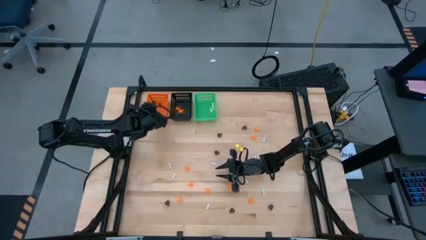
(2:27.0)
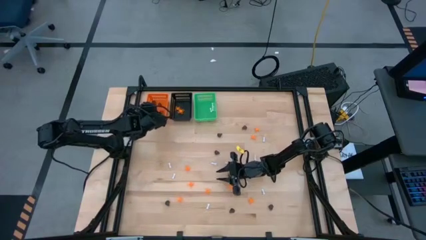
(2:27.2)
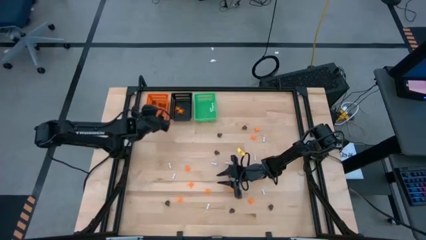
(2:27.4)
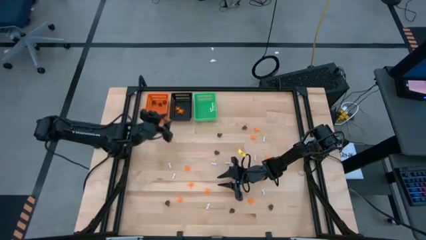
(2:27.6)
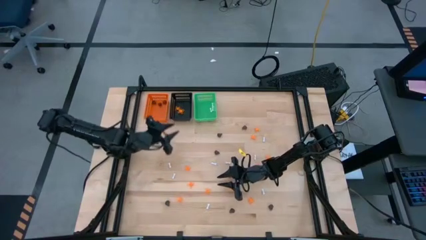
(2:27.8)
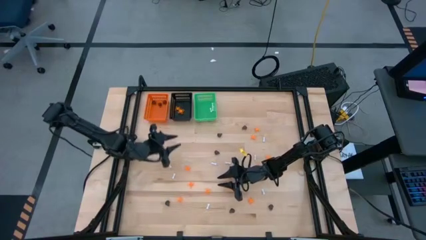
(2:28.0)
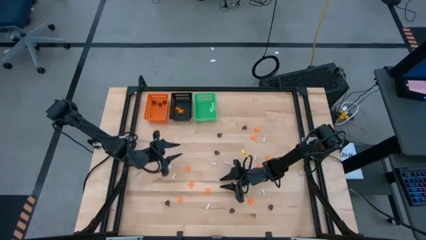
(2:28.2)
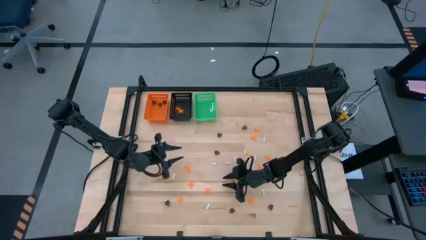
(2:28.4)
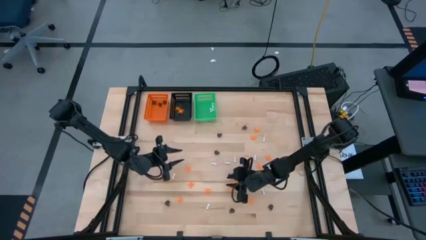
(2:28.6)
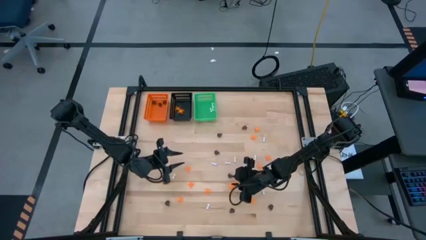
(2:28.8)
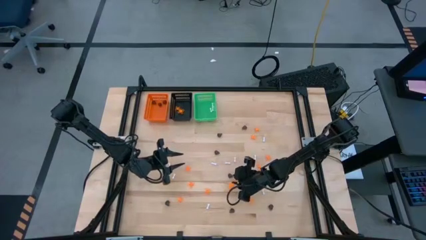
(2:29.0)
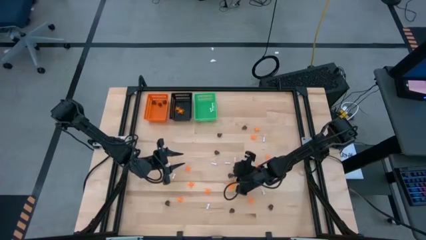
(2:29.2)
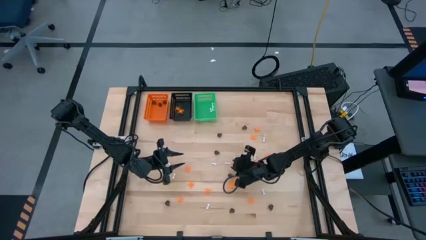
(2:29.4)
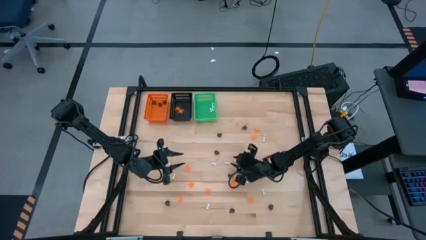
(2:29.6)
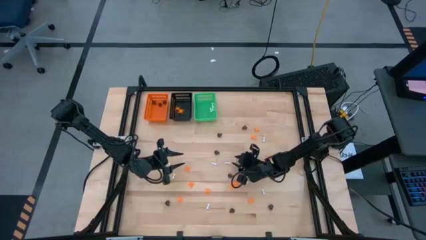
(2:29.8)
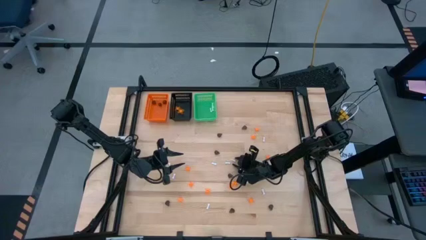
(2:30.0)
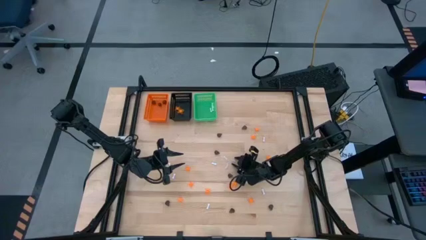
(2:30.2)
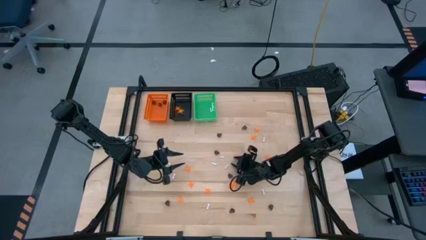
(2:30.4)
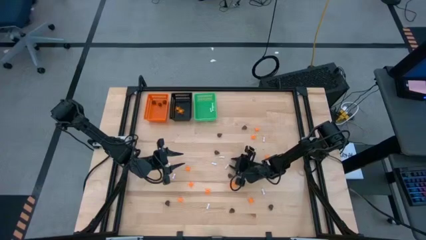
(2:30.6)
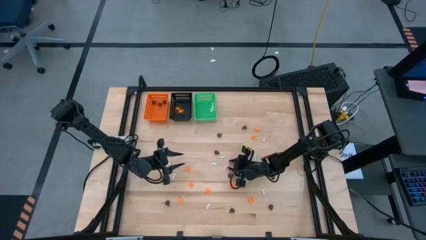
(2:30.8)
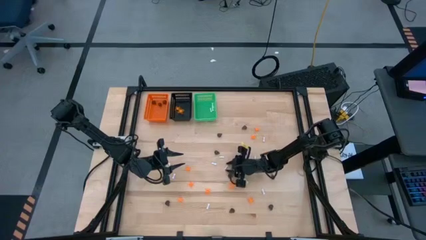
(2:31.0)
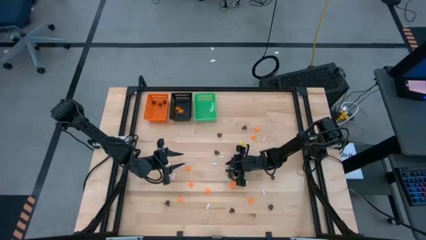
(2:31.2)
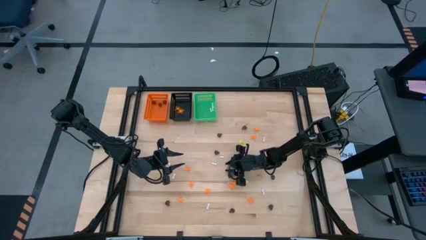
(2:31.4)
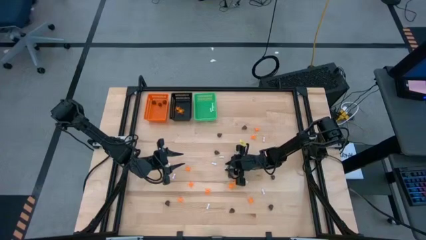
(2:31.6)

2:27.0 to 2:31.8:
Task: Sort Halloween decoration
Put the white bone toy into the green bin

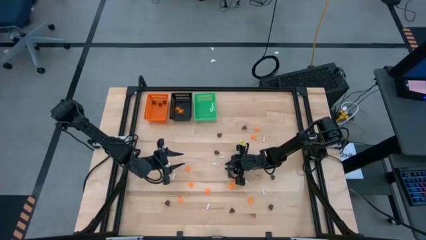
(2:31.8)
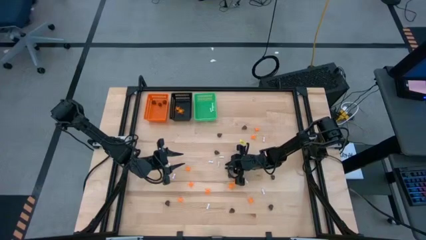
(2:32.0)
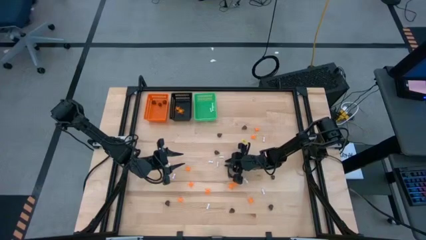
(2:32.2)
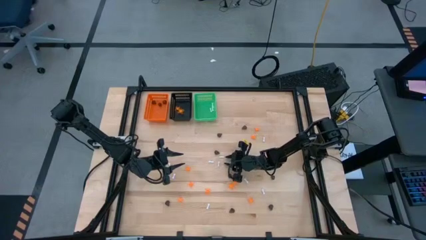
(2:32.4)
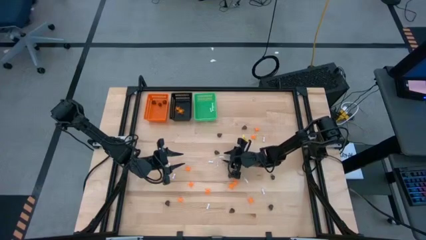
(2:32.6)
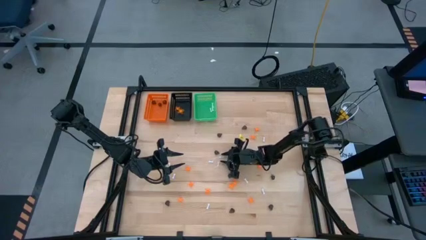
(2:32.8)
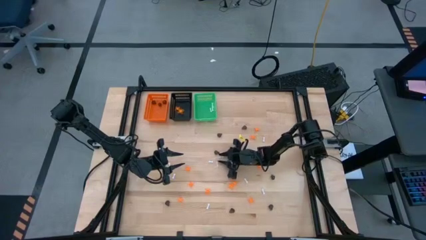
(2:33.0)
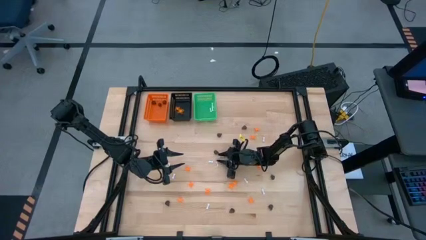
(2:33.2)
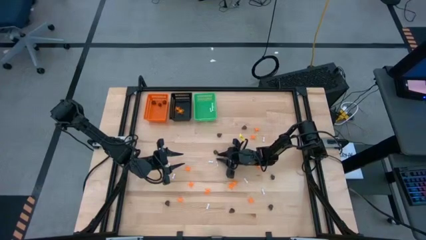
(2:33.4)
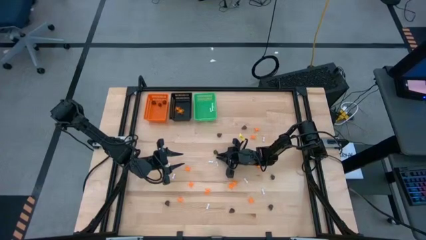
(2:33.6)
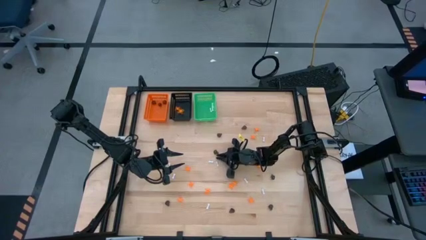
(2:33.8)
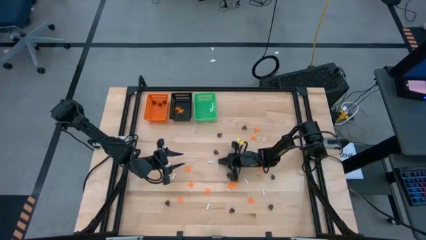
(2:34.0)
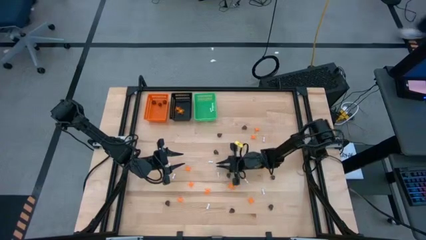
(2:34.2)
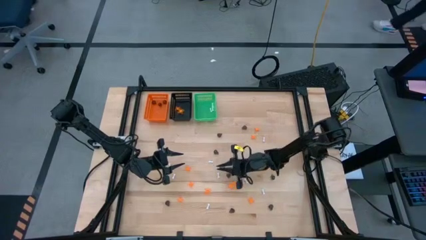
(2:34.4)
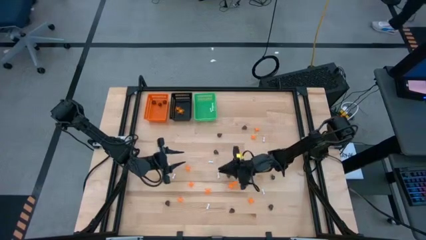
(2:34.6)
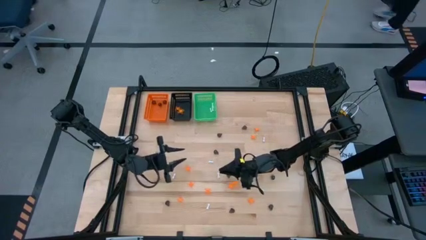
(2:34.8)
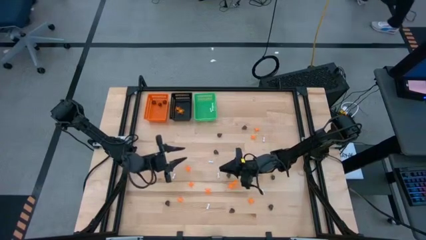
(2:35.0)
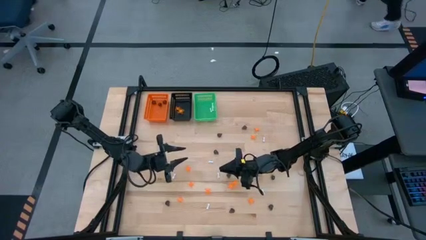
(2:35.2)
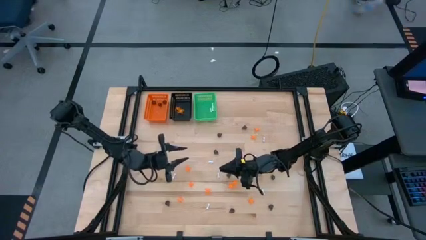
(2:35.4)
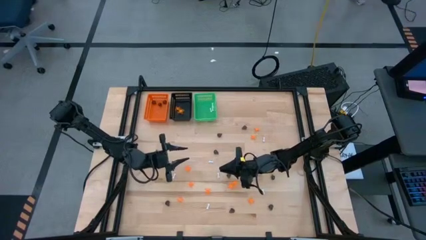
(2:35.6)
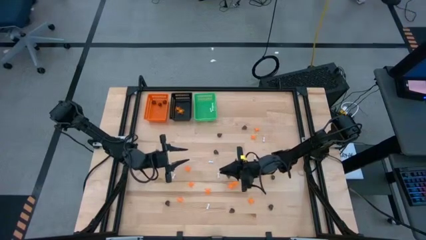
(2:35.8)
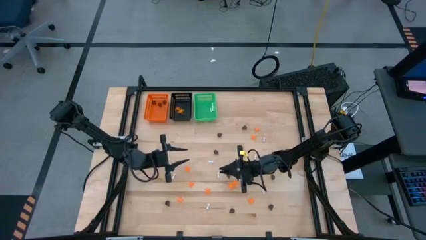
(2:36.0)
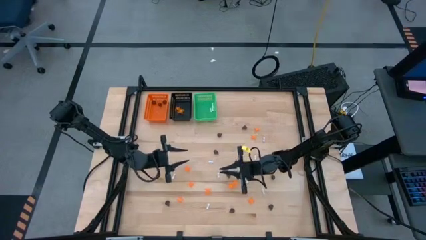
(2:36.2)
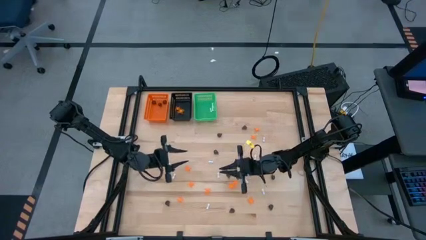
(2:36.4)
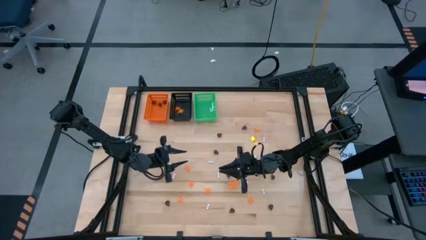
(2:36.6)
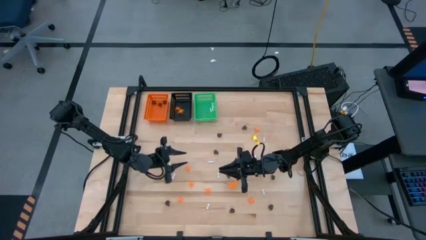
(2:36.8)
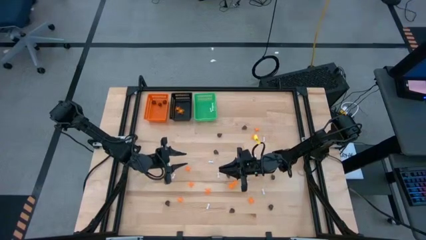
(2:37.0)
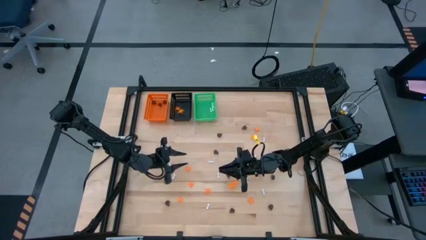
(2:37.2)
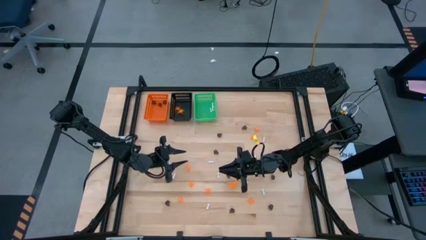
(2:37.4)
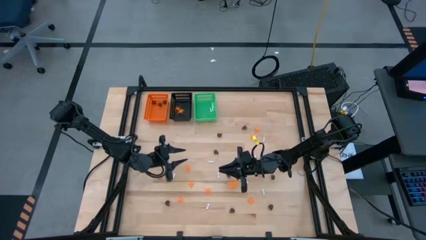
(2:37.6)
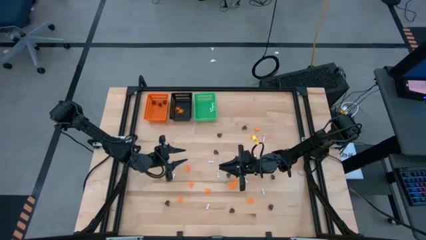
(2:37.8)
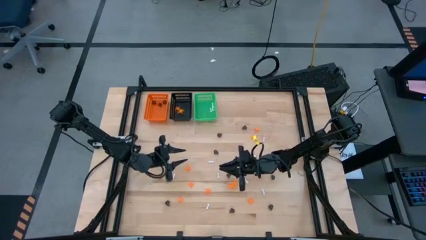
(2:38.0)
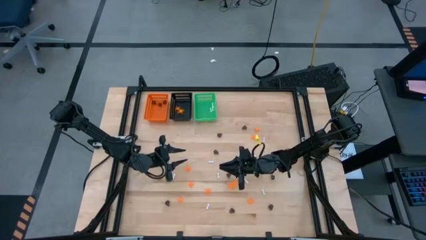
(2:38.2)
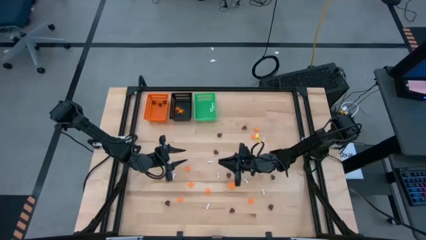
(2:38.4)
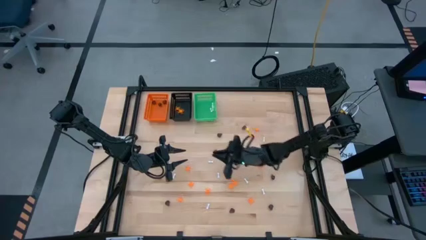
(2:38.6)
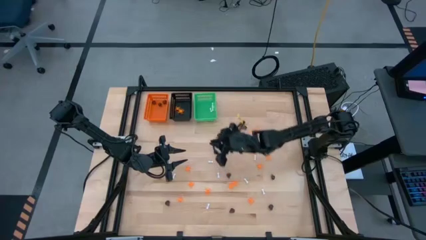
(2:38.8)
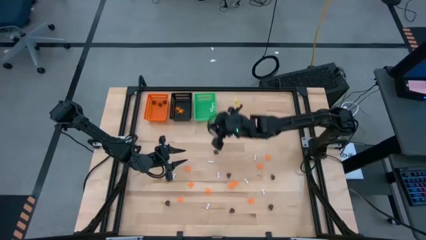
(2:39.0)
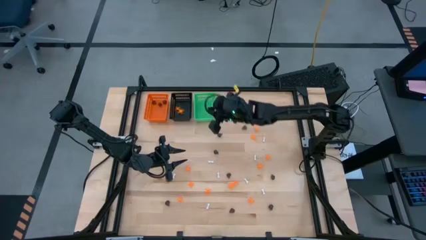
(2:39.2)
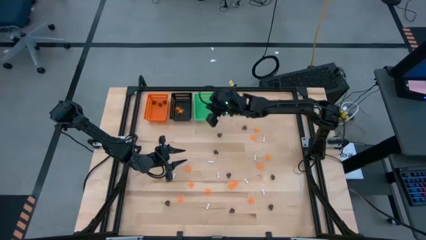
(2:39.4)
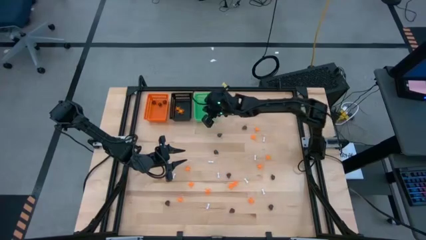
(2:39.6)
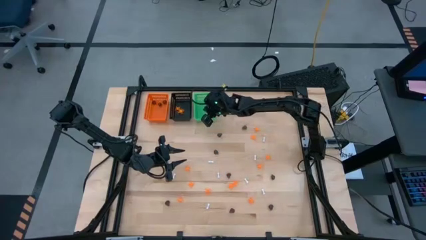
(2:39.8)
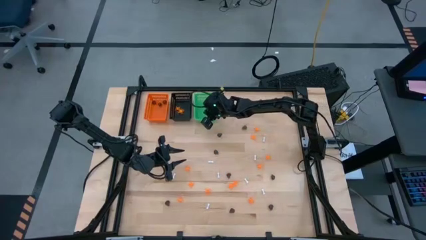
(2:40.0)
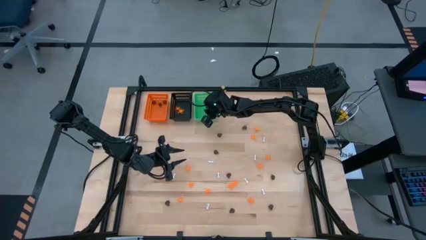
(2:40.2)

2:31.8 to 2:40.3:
Put the white bone toy into the green bin

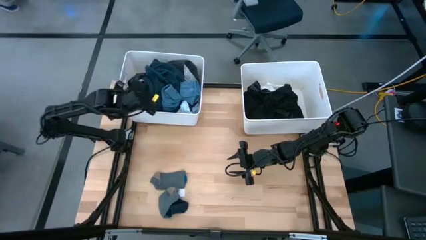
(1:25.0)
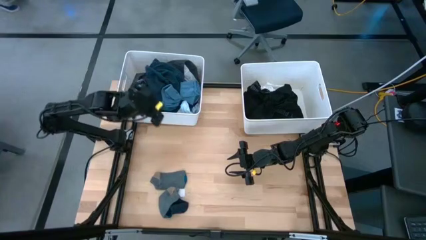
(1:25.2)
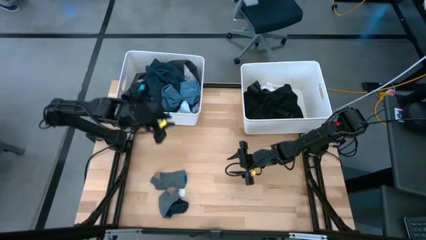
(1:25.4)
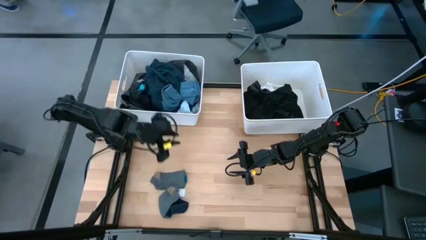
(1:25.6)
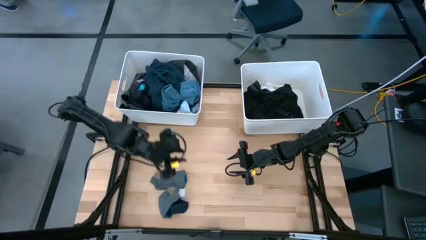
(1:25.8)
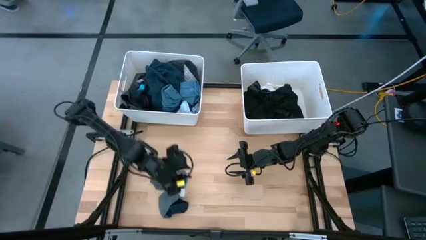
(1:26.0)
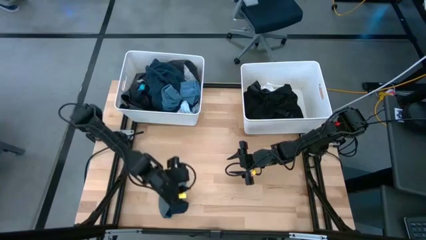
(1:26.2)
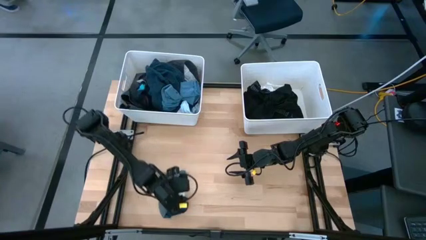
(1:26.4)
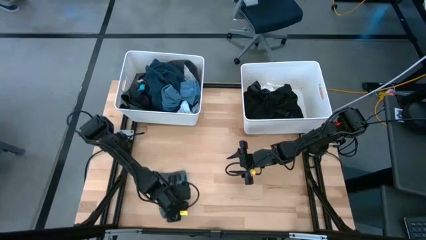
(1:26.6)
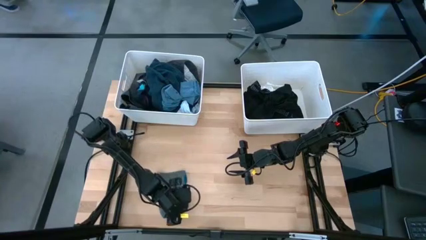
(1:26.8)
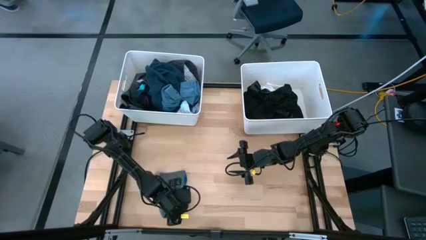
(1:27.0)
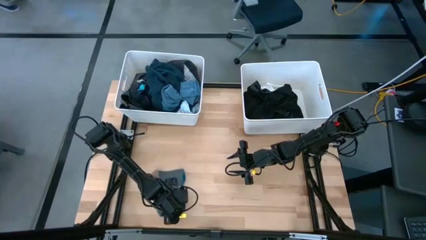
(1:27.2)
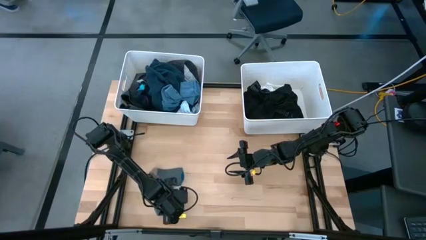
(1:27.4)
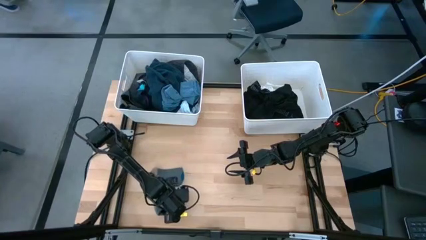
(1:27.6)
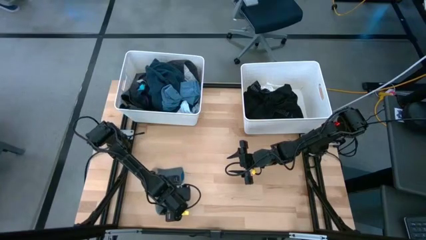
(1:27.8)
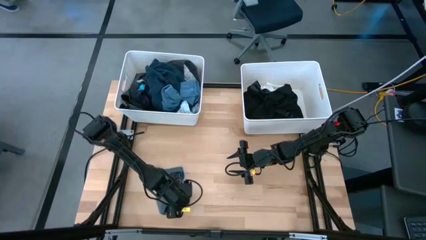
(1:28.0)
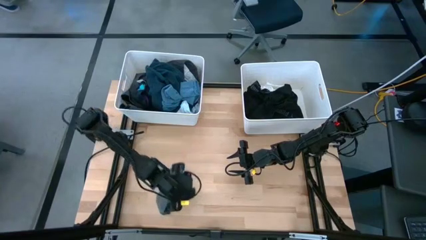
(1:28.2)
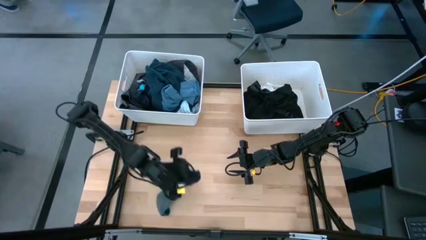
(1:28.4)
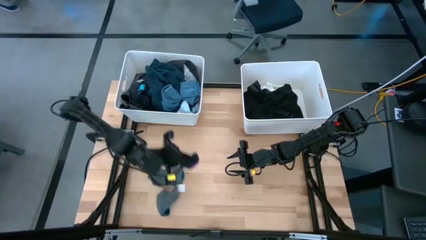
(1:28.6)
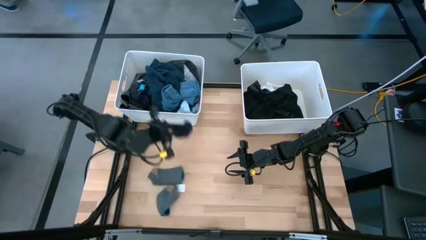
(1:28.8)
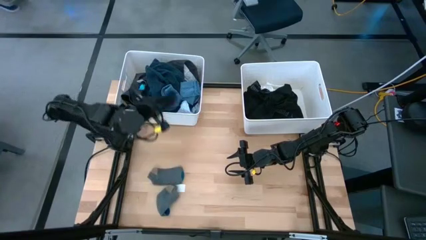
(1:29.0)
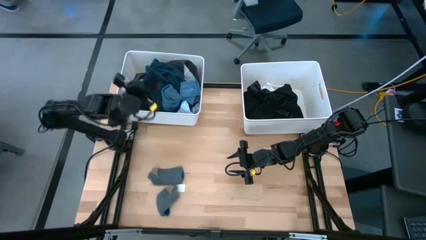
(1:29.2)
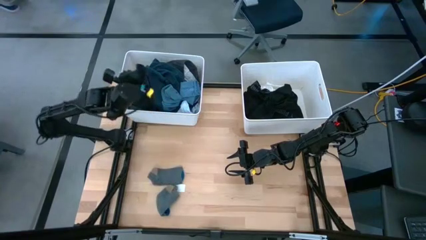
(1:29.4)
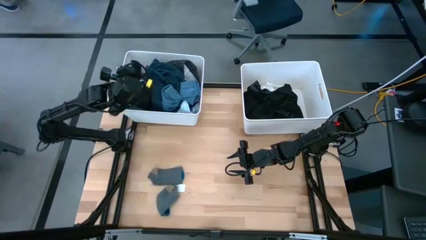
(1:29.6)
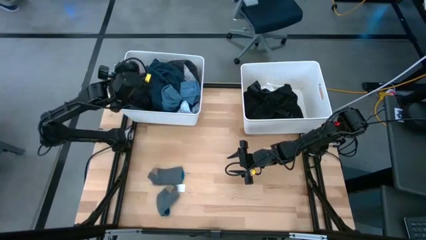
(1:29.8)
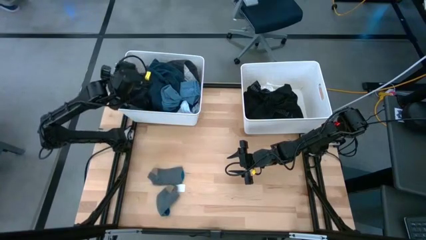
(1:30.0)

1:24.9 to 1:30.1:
Task: Sort clothes
Put the dark blue sock into the left white laundry bin
